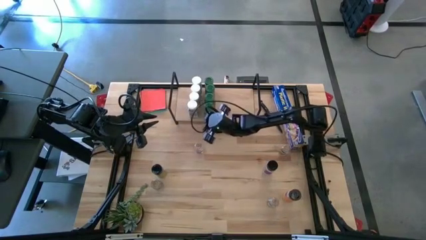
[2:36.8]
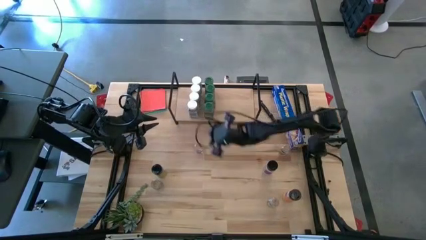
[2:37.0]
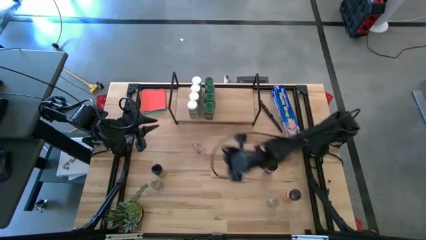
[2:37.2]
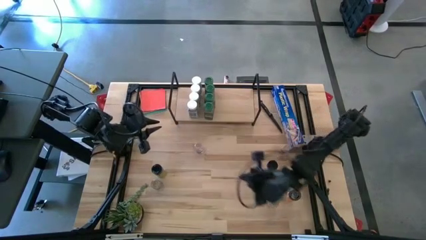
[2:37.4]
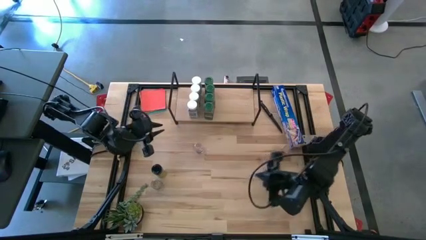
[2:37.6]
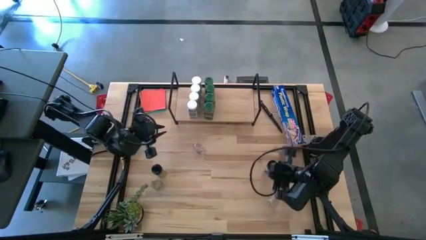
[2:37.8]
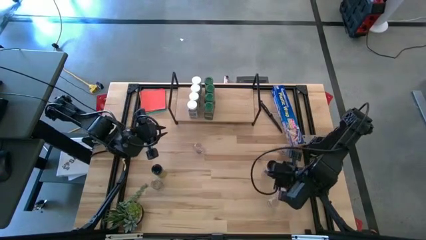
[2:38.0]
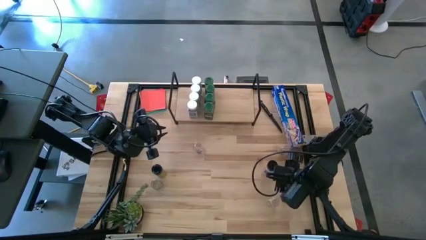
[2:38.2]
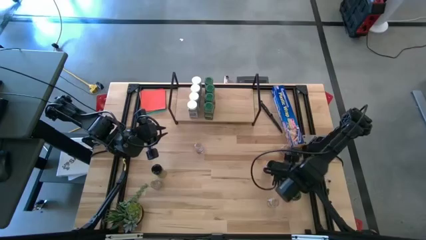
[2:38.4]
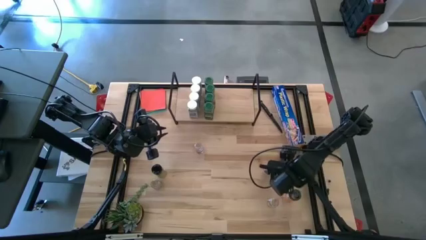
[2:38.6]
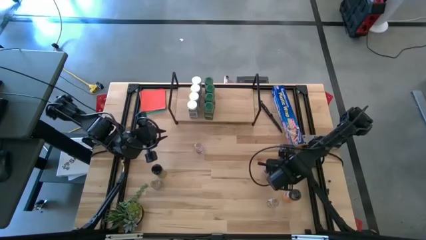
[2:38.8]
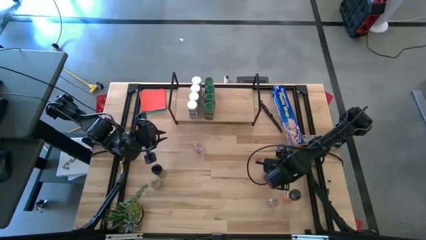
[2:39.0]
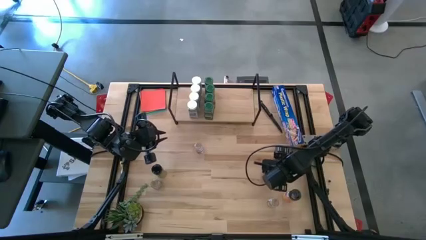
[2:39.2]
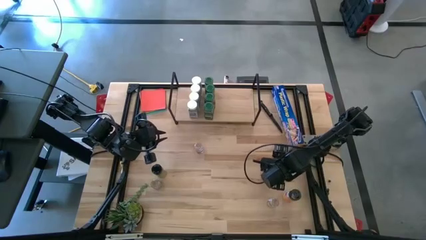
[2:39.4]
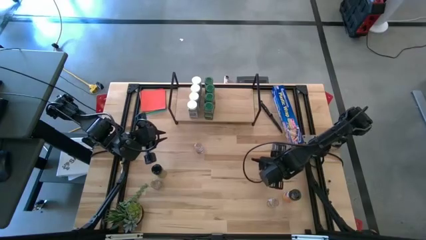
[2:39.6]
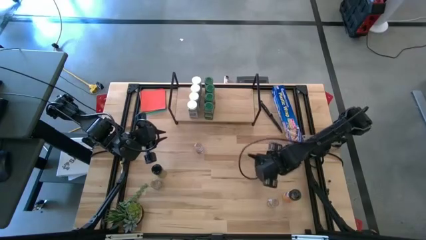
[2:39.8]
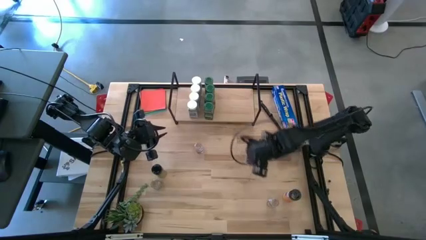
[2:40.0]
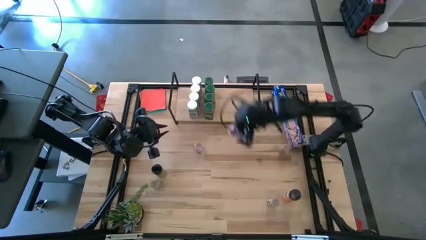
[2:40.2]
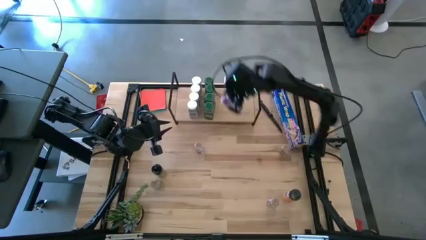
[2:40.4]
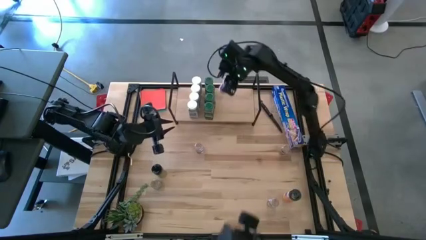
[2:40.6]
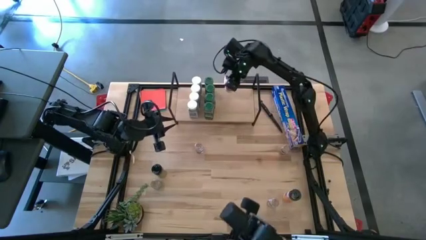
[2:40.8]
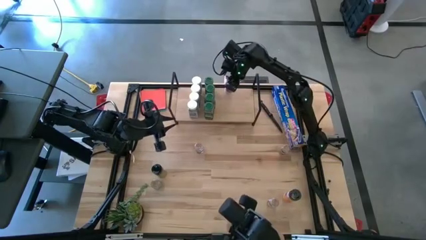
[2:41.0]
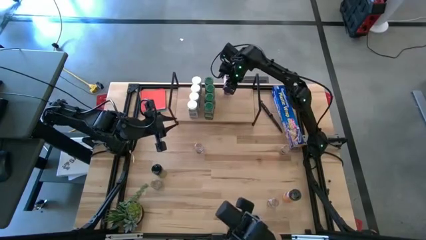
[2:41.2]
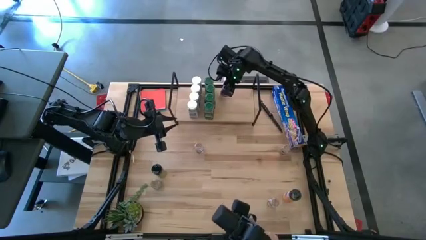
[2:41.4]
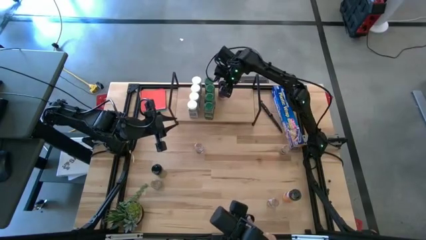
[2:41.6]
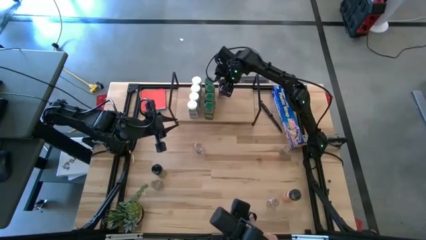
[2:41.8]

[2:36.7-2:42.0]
Task: Shelf spices
Put the top right black seasoning bottle on the shelf

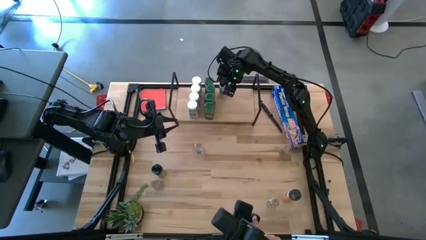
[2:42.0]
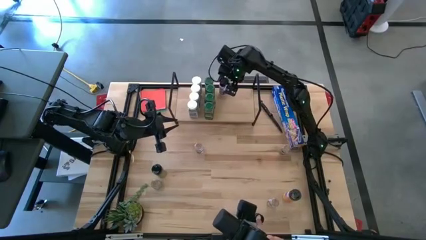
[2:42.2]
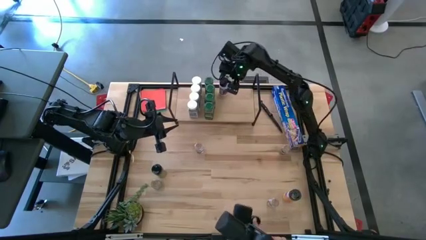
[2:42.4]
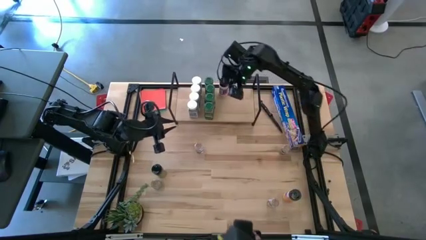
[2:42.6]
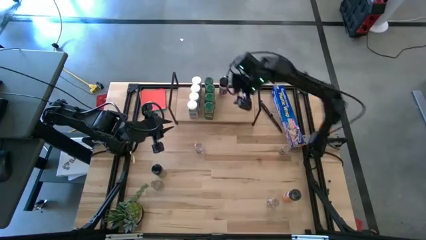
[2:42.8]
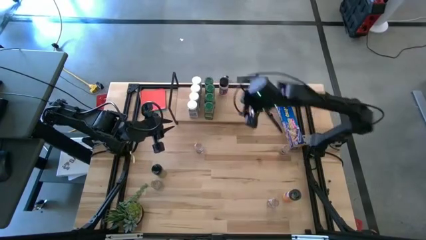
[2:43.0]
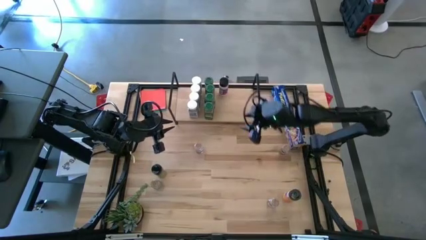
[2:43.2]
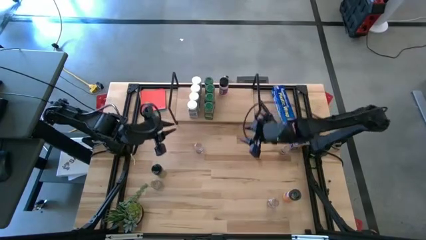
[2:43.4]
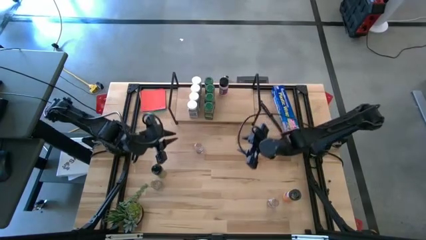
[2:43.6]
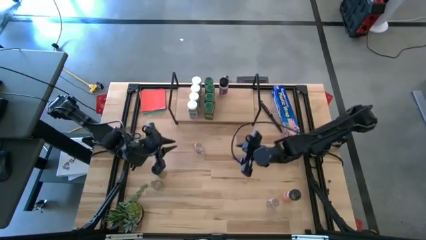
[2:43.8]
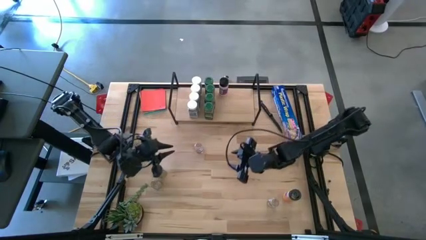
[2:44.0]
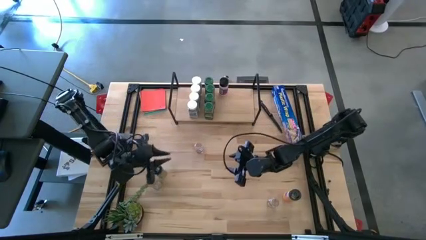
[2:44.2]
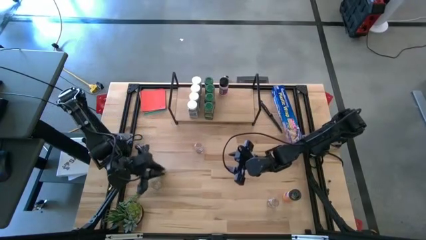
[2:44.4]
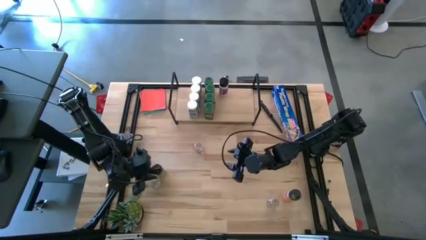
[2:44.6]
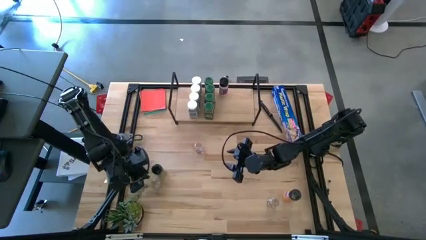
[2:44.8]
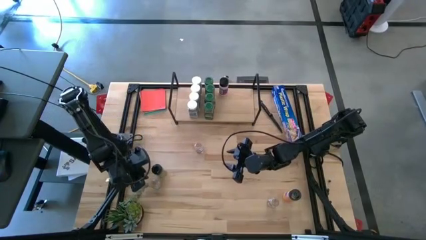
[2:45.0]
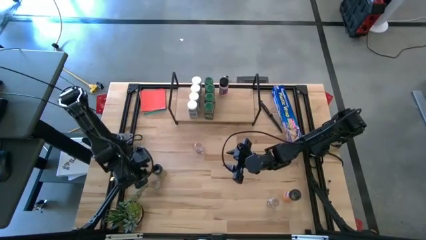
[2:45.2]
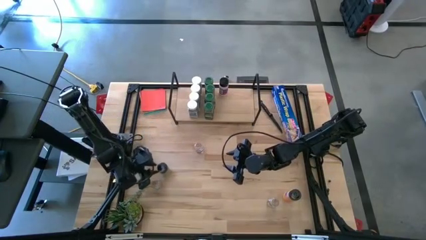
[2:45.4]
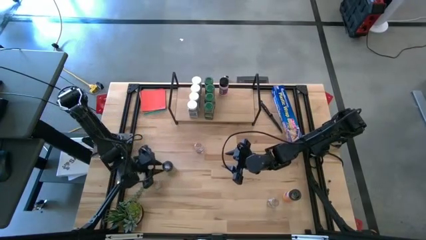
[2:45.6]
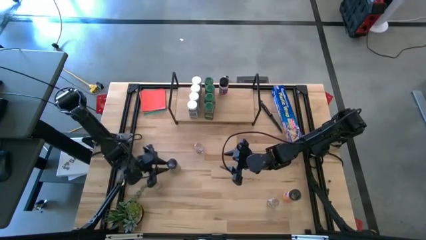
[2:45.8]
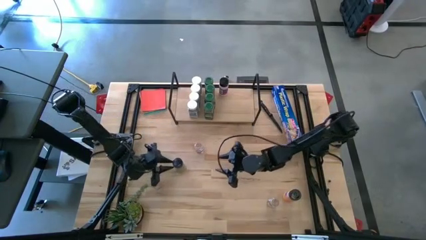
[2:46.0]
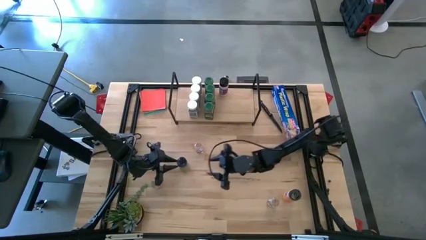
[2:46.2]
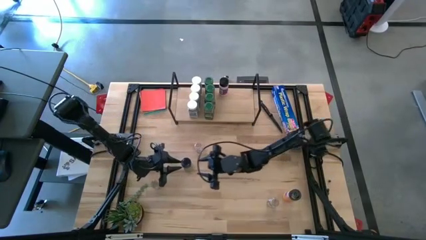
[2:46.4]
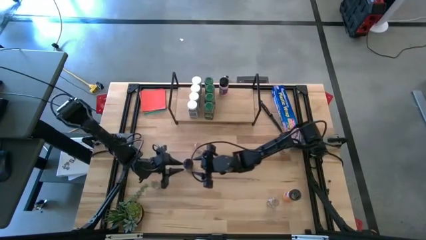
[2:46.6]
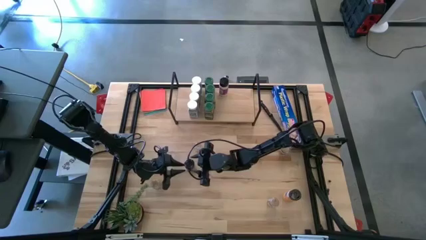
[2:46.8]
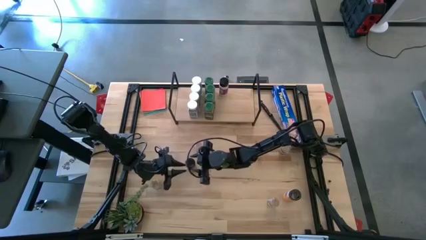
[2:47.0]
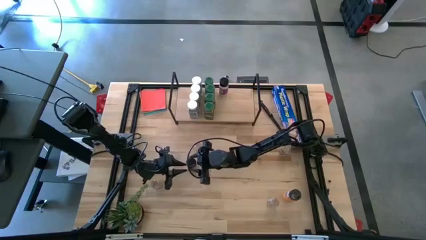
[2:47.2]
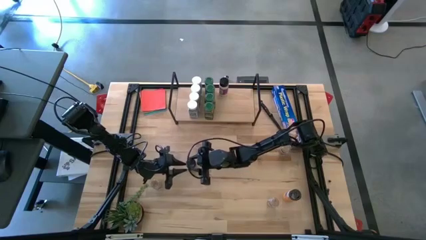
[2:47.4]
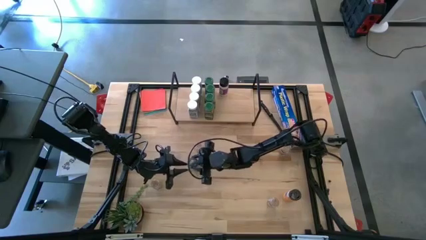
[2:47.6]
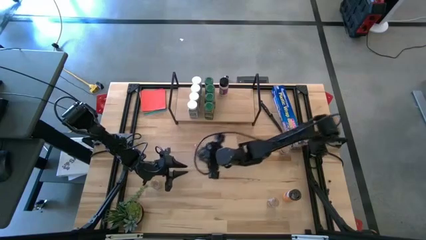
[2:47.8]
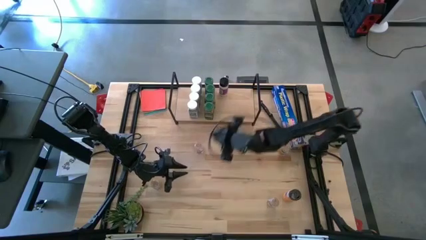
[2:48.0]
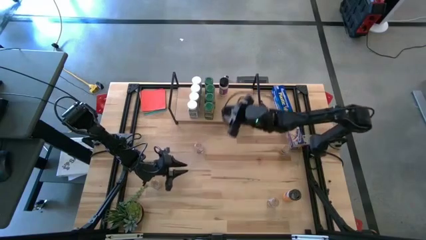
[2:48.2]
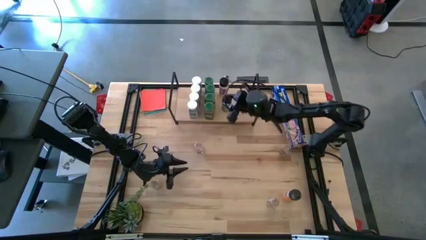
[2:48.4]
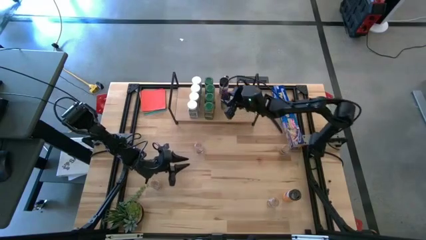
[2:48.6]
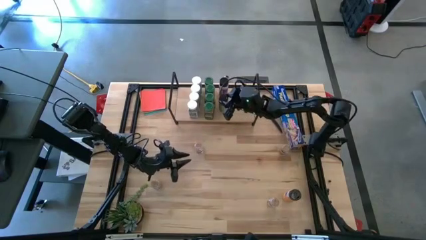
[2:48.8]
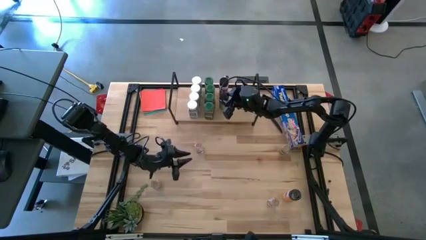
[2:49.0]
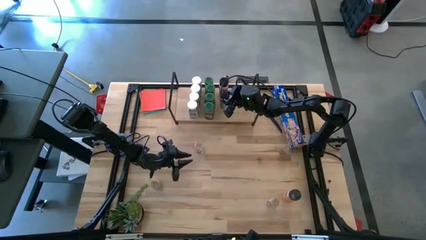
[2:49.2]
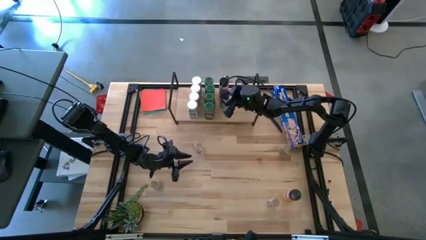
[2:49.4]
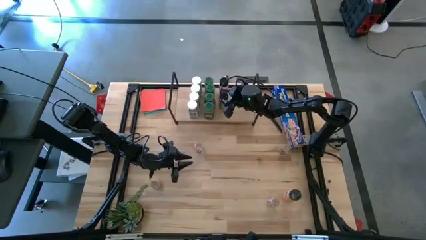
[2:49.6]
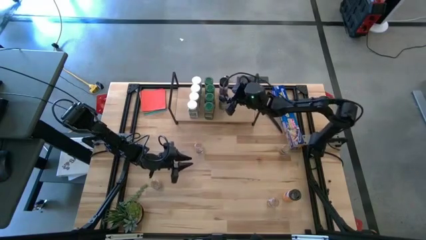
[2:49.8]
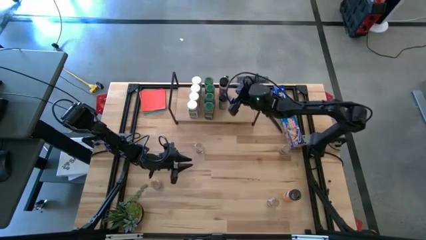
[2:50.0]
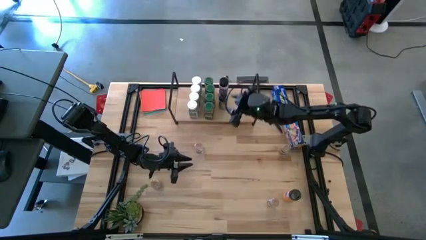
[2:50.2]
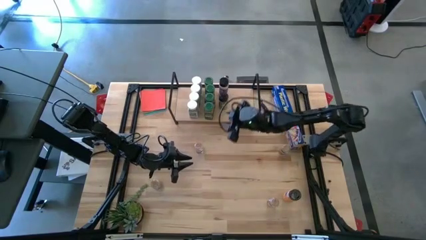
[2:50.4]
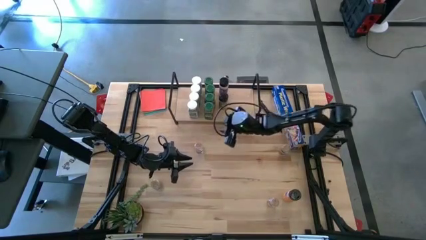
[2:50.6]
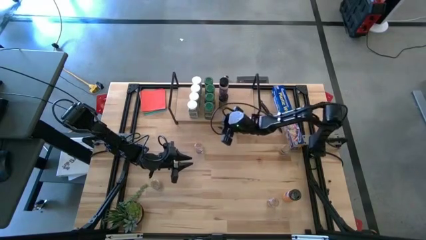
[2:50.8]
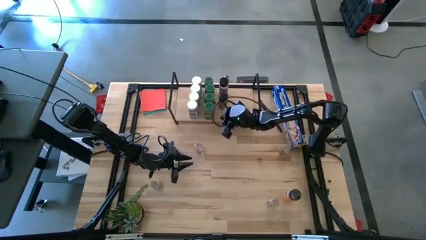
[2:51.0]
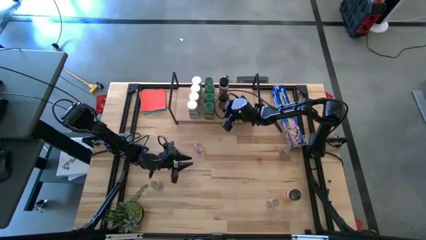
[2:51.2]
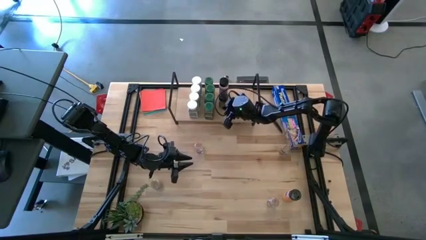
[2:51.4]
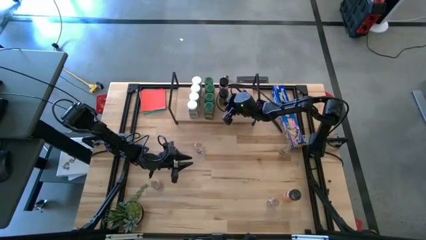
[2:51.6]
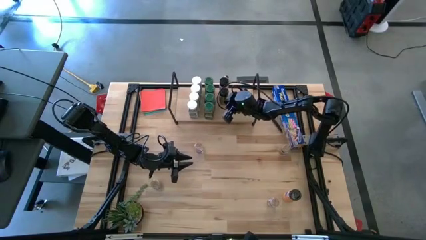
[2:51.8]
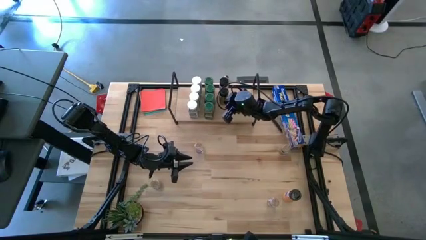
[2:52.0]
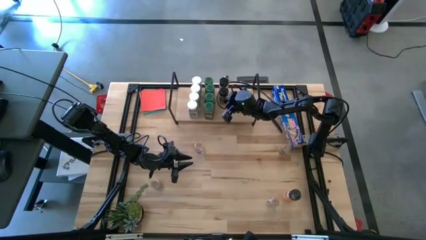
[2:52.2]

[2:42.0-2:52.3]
Put the left black seasoning bottle on the shelf
